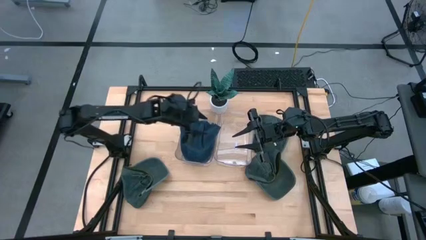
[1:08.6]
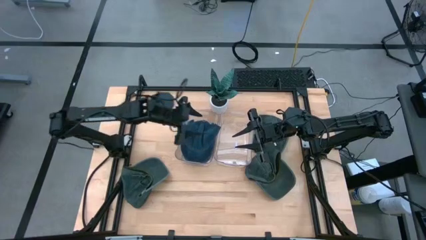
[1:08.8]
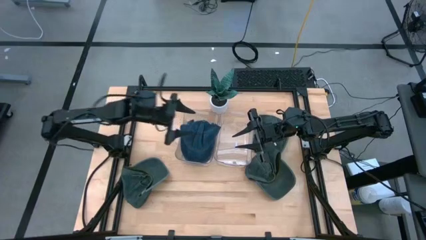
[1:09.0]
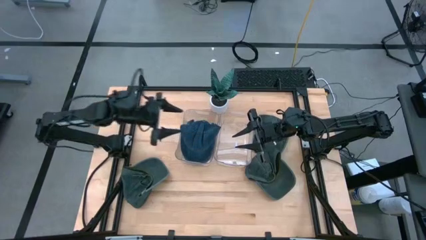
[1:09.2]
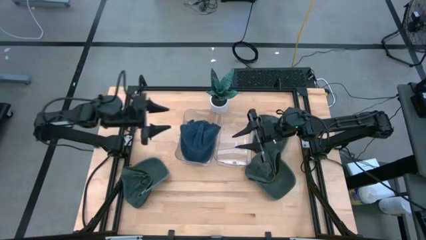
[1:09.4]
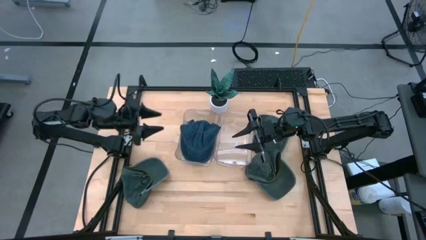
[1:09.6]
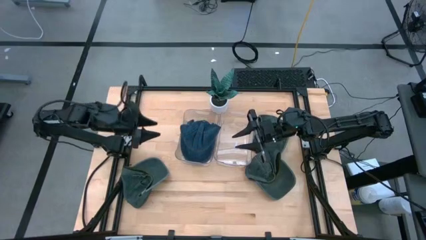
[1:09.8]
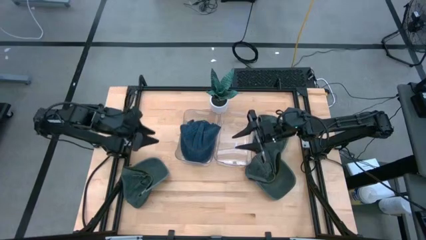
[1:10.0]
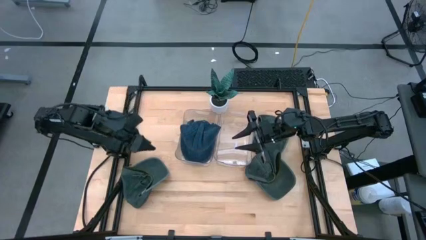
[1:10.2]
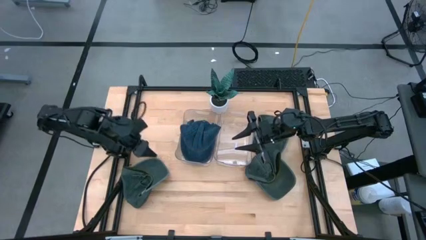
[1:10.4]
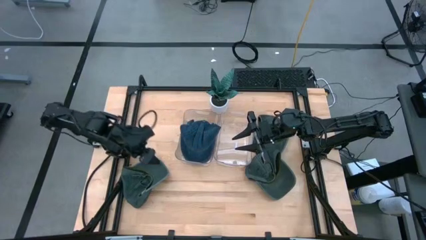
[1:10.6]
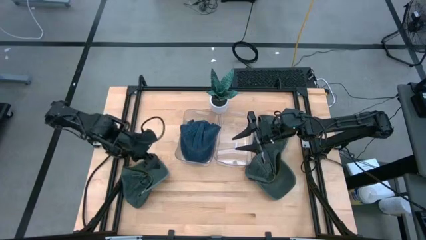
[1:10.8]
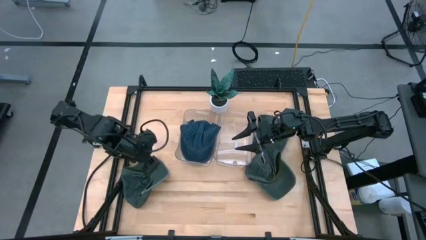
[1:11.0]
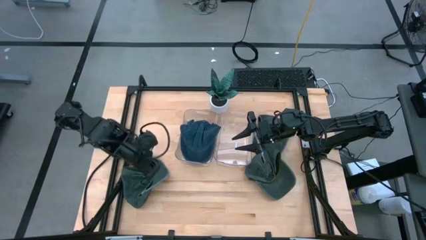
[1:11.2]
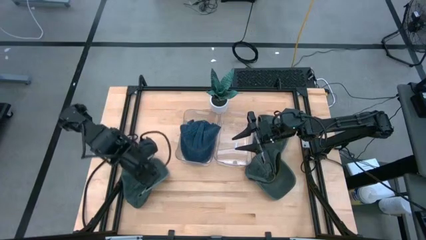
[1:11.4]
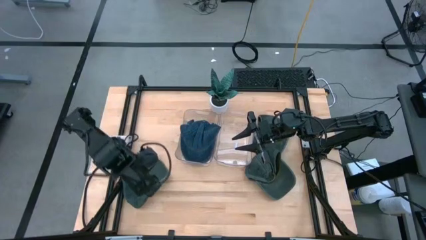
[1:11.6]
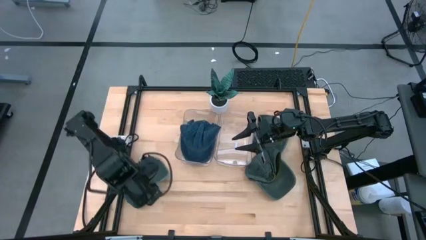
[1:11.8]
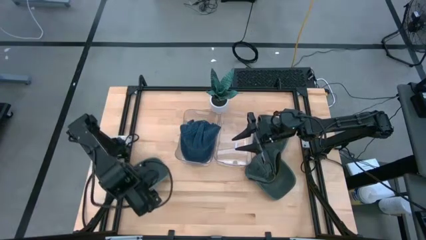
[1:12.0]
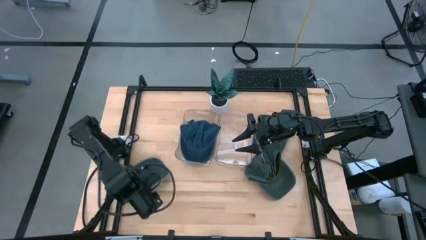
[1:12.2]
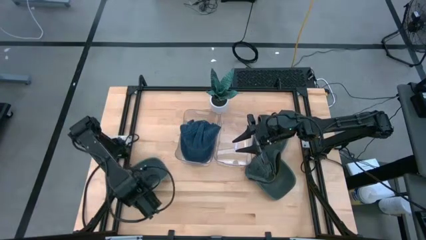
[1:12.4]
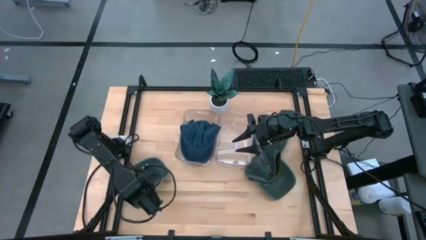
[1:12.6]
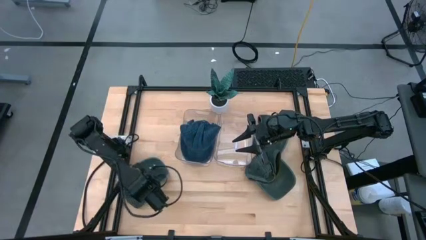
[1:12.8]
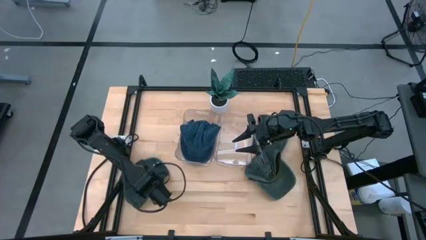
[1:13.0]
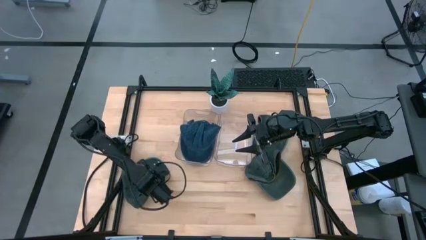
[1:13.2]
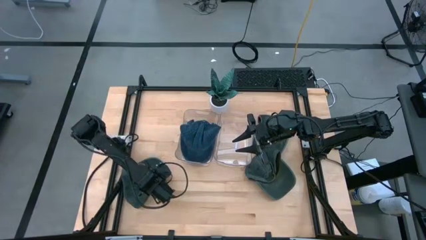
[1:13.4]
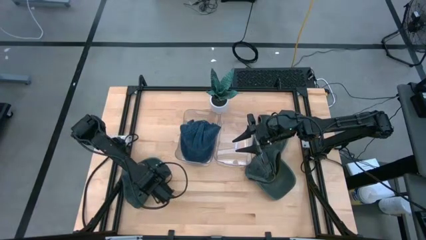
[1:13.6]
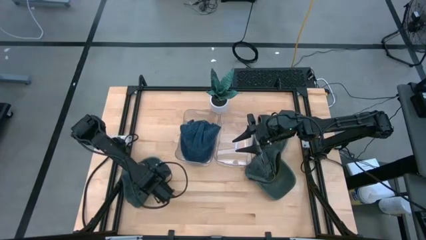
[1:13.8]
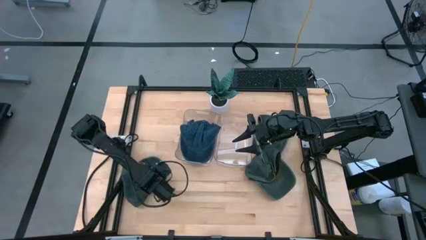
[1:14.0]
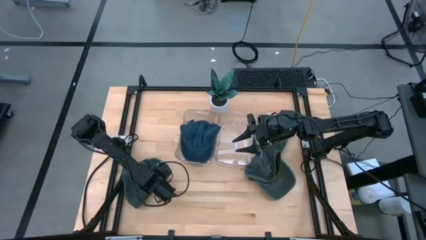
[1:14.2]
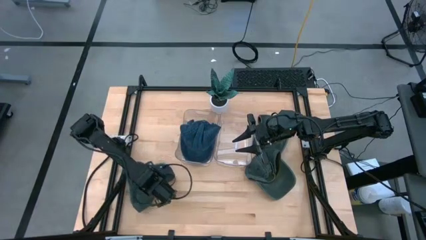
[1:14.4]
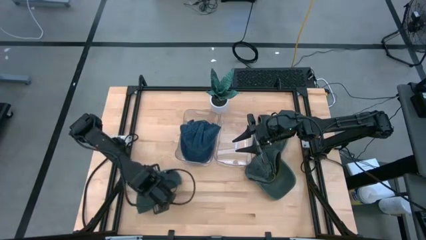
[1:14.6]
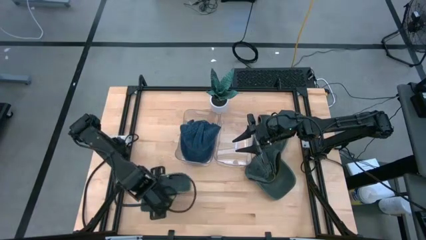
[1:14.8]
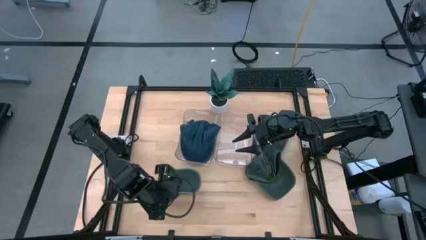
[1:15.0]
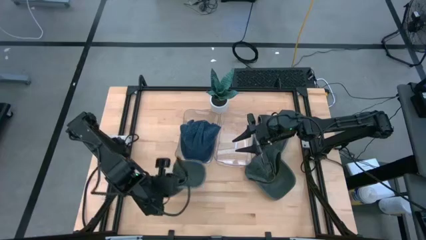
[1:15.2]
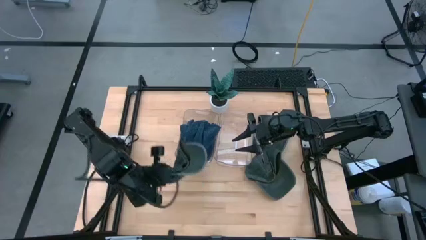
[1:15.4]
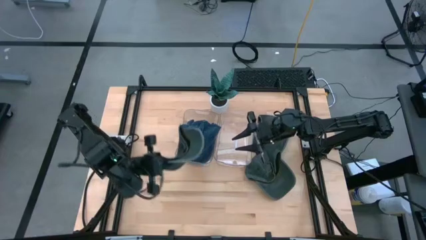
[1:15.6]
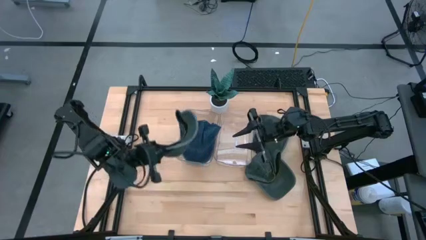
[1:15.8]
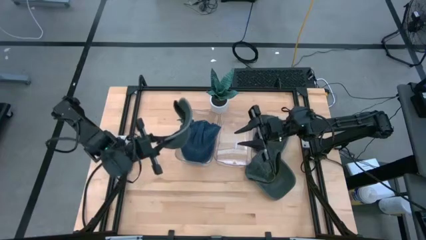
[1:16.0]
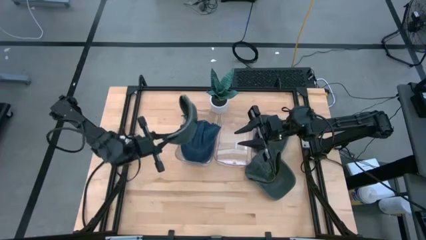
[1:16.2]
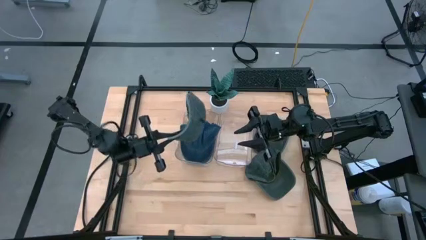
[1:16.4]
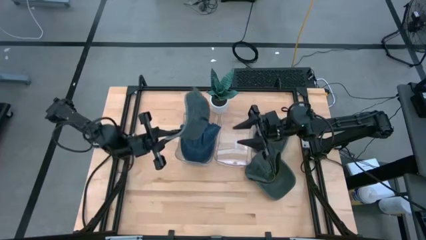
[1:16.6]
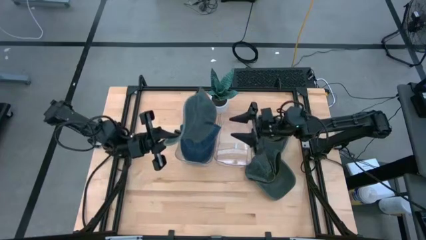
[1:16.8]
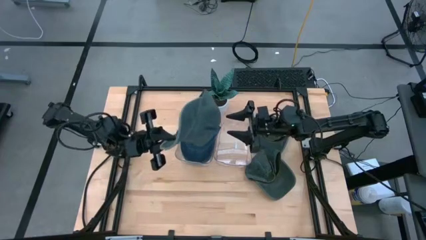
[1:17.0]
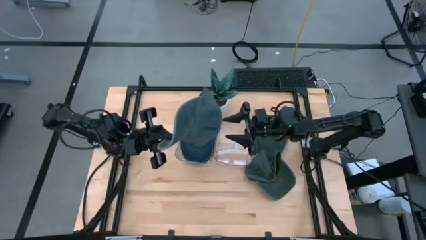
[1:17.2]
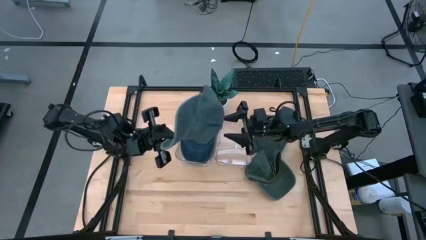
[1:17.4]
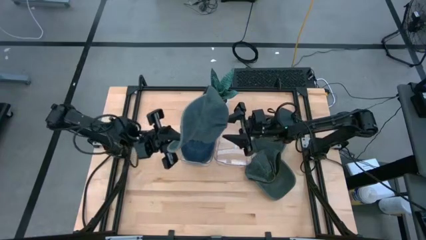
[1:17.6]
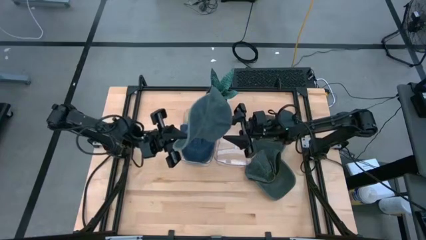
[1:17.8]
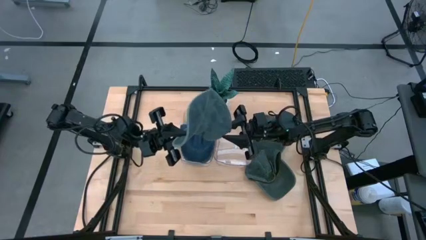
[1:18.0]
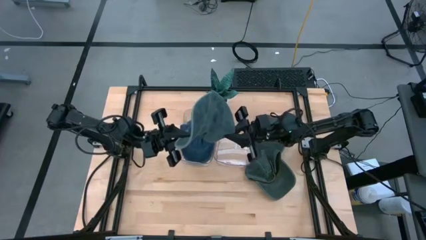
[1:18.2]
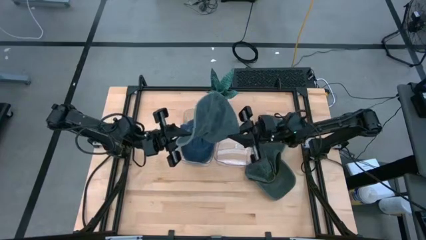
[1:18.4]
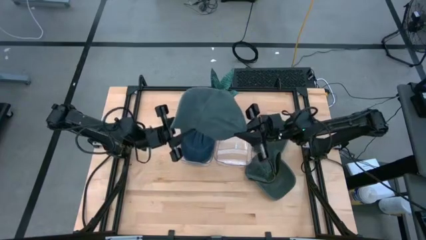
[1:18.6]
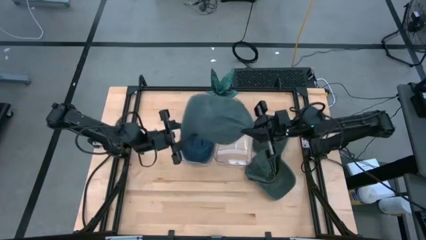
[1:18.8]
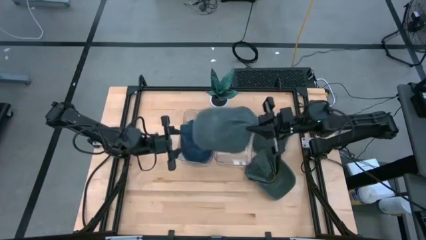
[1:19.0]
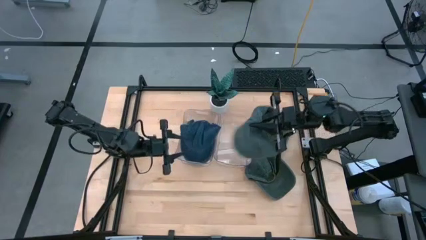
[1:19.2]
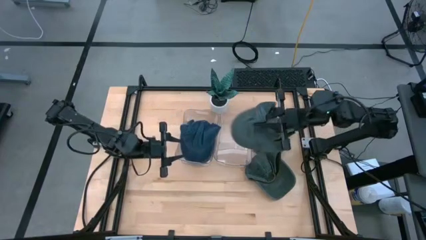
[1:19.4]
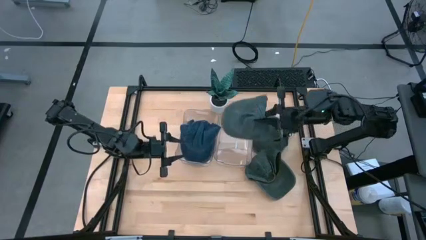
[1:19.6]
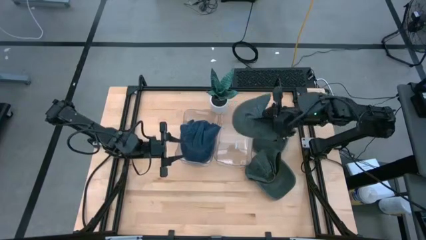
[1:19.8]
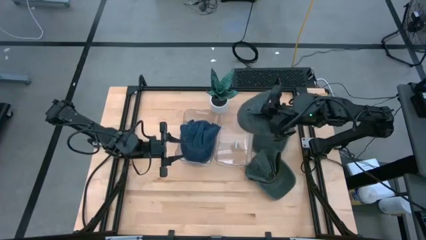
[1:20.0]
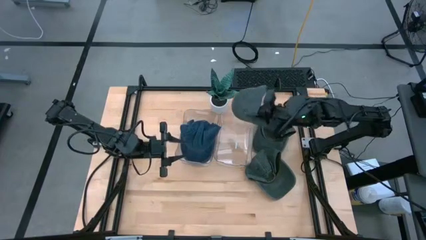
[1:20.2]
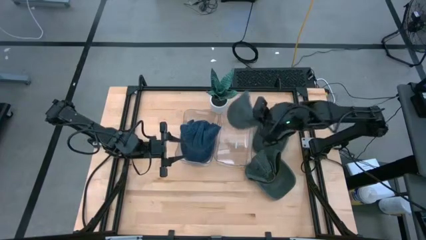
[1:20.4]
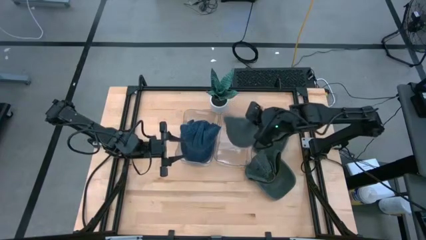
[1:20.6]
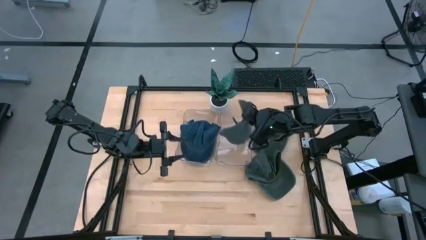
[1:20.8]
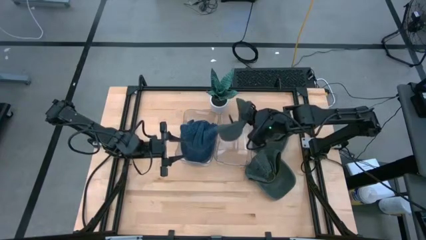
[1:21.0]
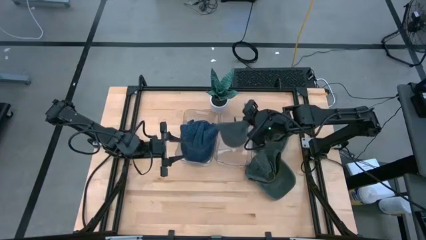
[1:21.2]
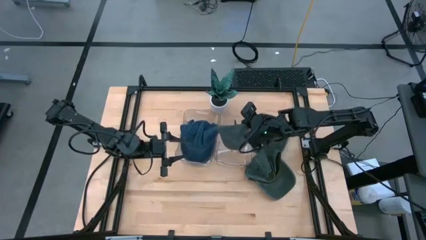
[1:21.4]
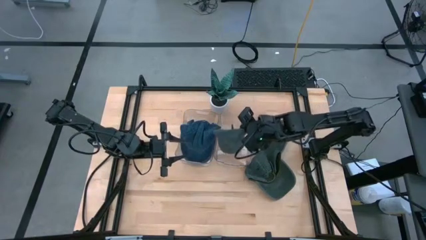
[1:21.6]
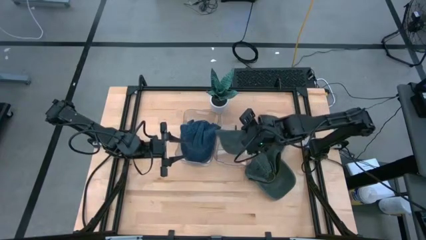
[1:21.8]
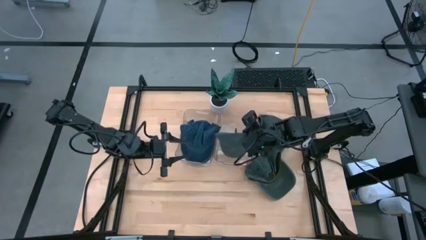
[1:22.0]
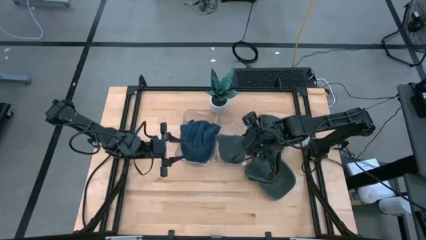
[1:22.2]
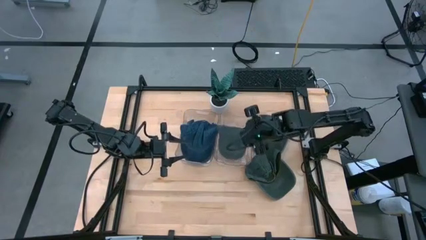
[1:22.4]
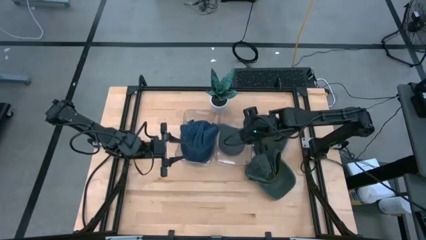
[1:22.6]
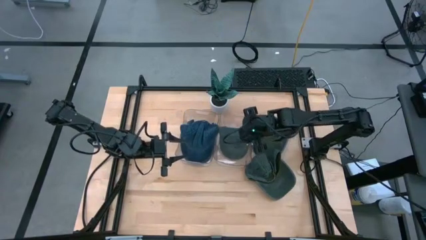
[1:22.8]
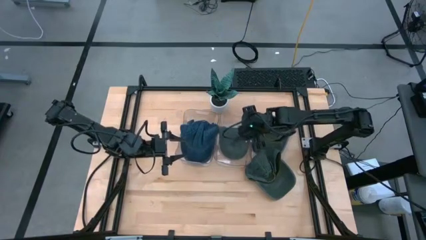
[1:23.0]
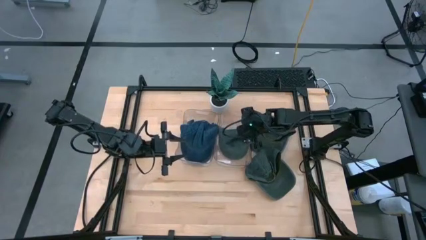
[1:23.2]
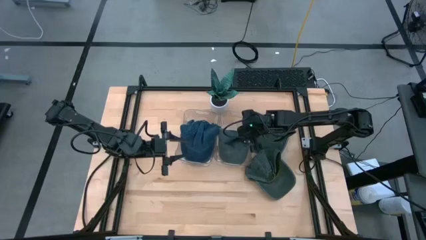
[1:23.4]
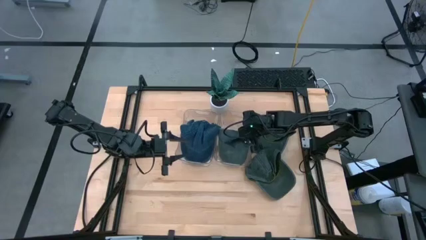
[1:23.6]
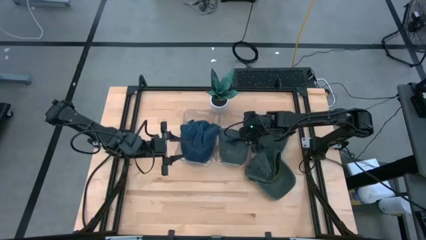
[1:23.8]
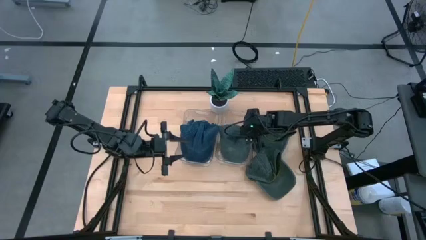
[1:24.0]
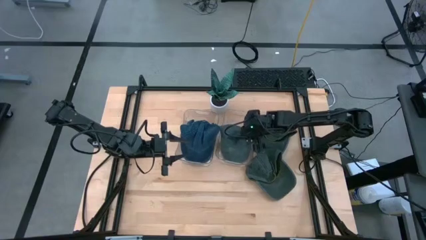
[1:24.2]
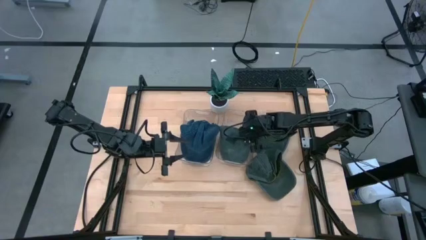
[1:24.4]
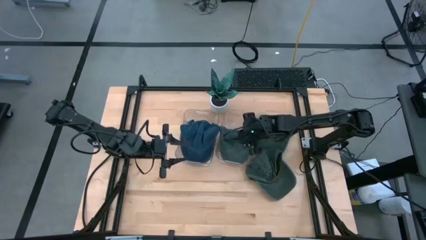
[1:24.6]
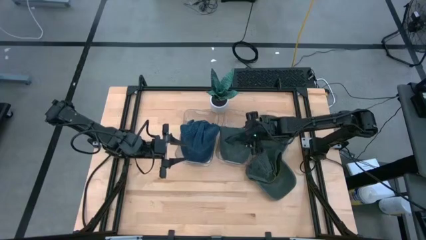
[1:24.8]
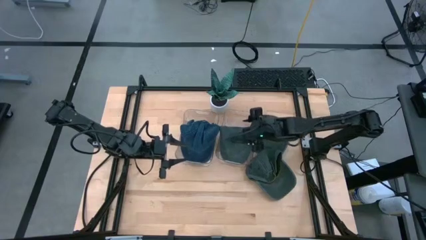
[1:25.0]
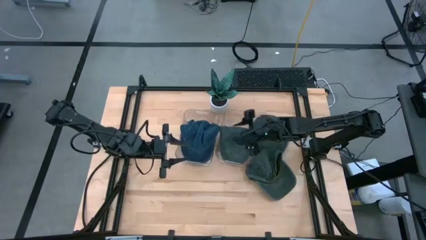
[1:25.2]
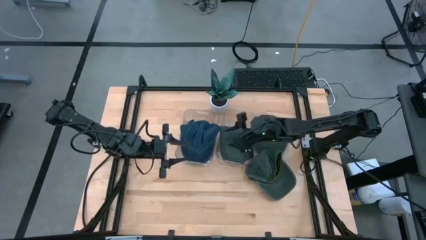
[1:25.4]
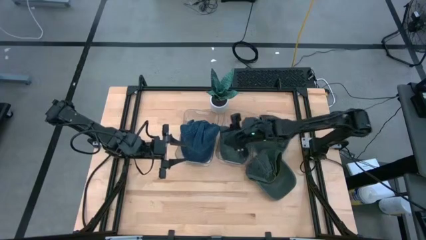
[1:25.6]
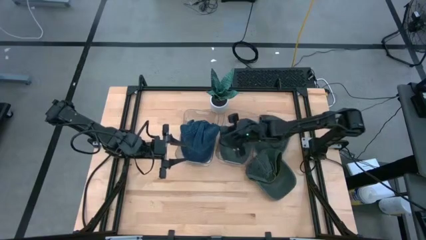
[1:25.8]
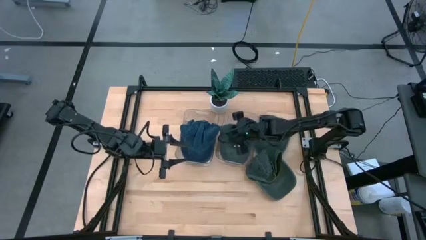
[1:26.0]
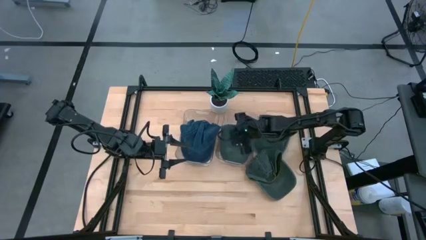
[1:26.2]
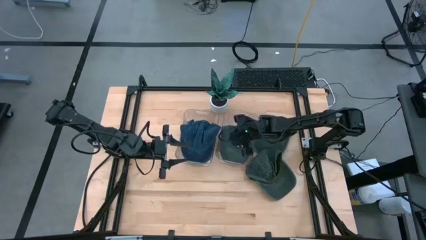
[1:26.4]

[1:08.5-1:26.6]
Task: Pick & Place hat
Put the bottom left gray cap into the right transparent bin
